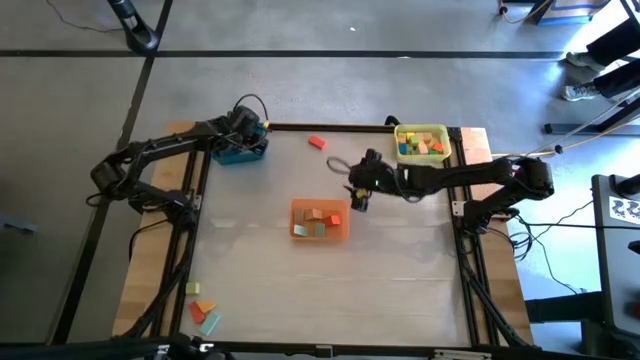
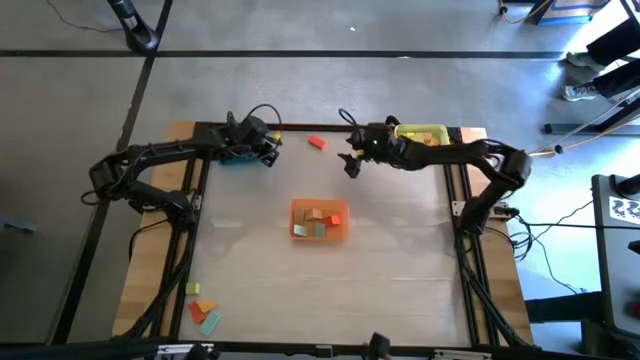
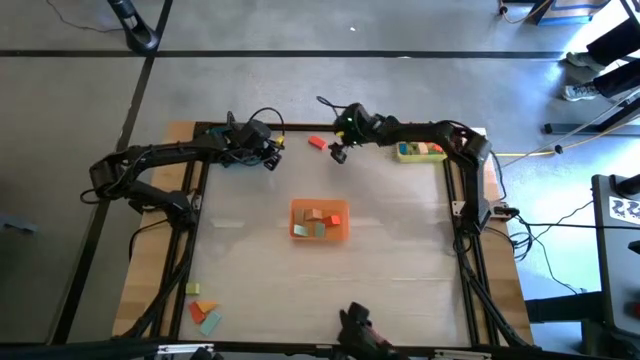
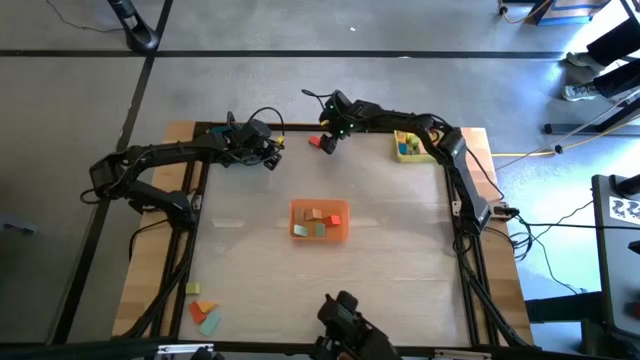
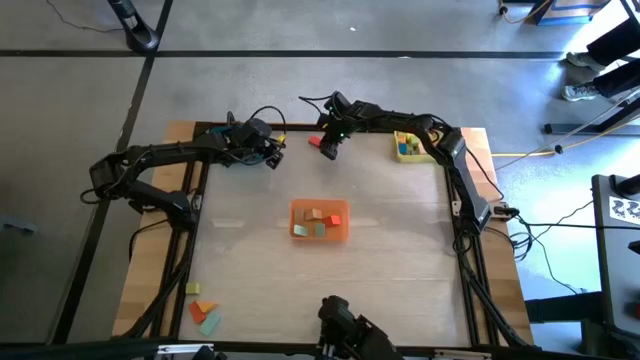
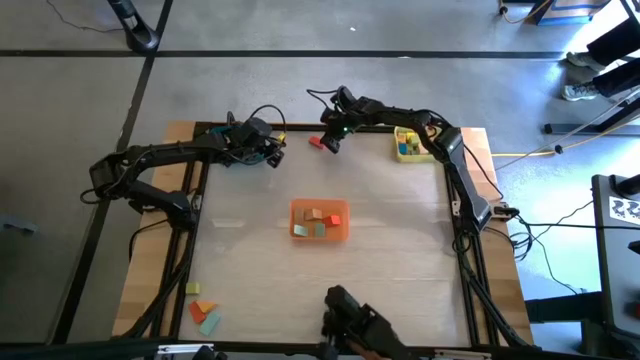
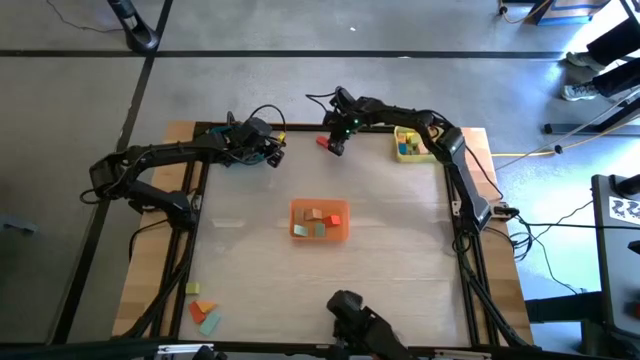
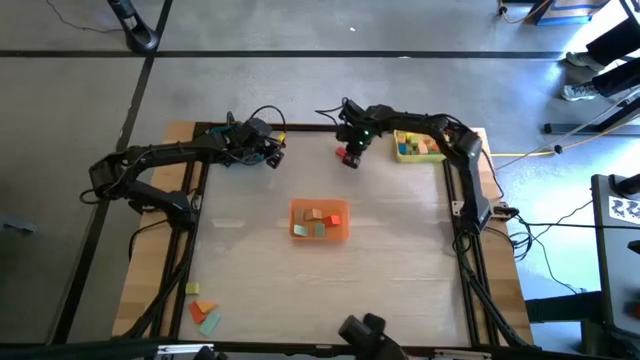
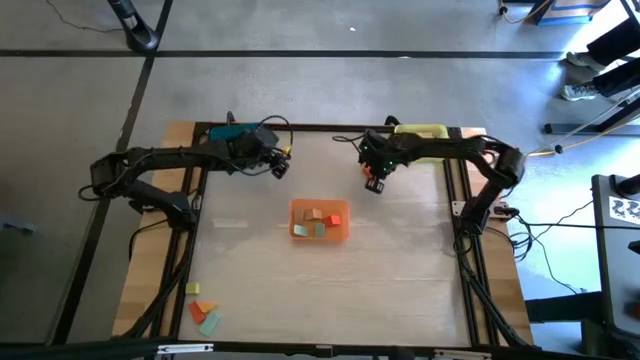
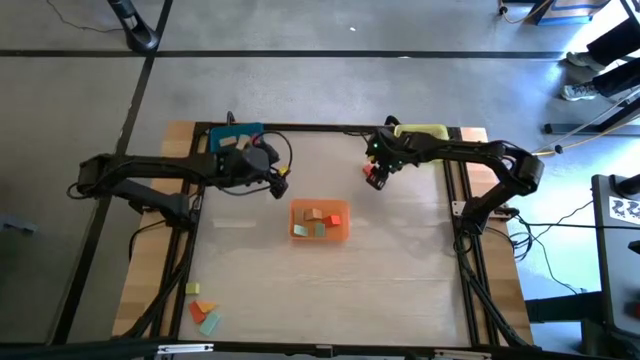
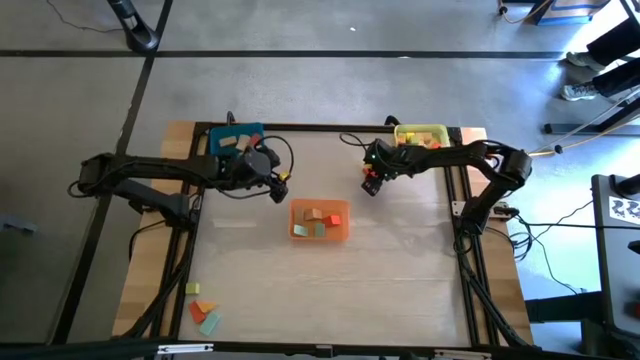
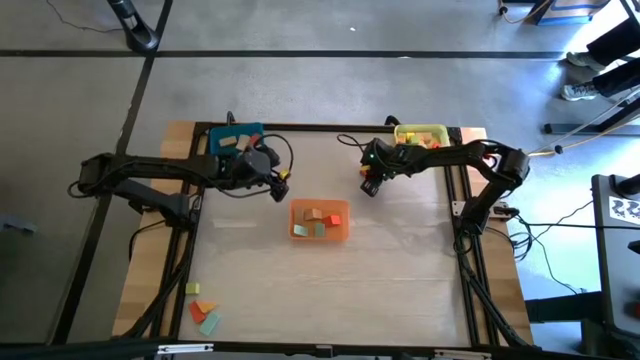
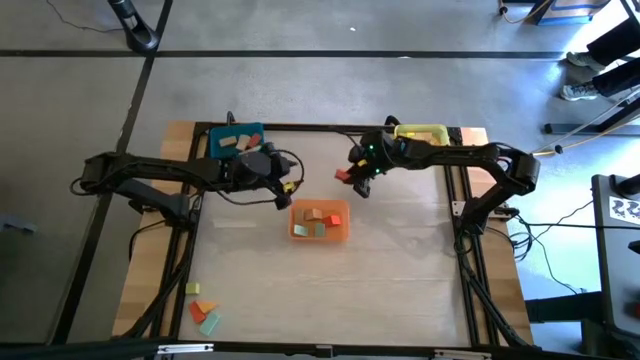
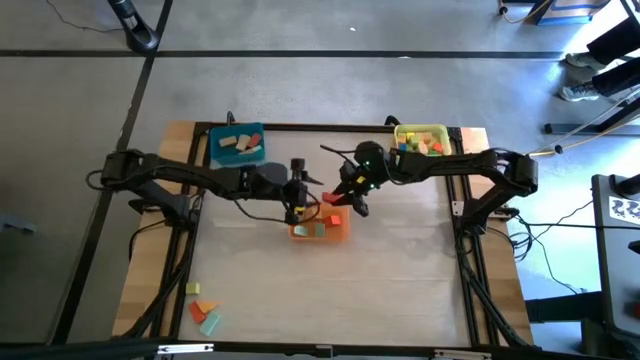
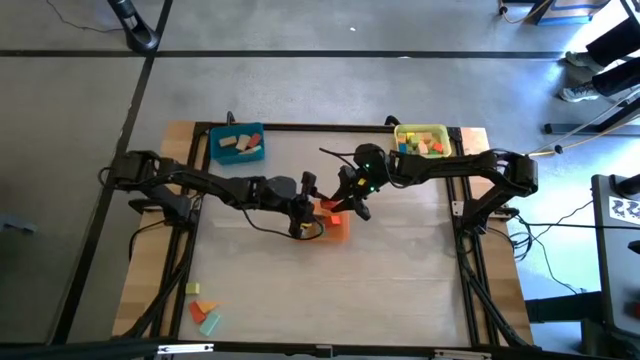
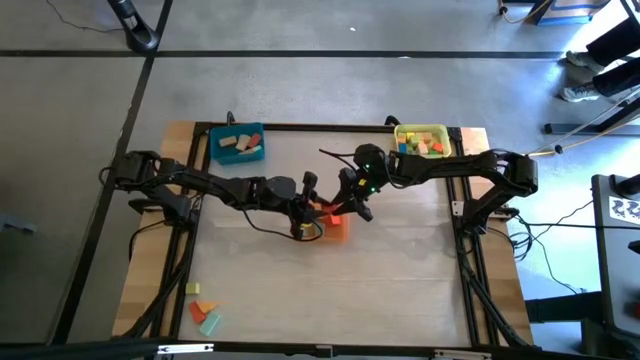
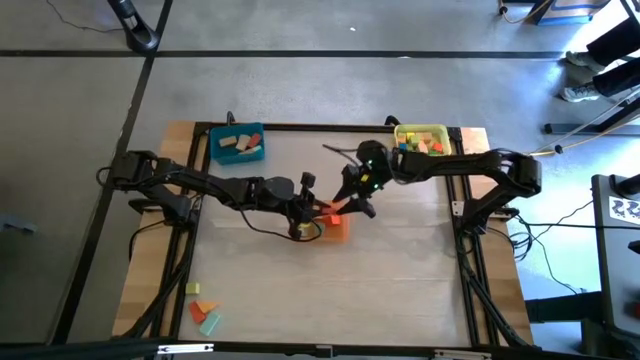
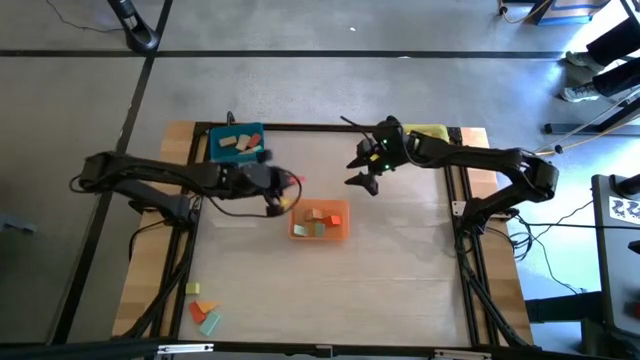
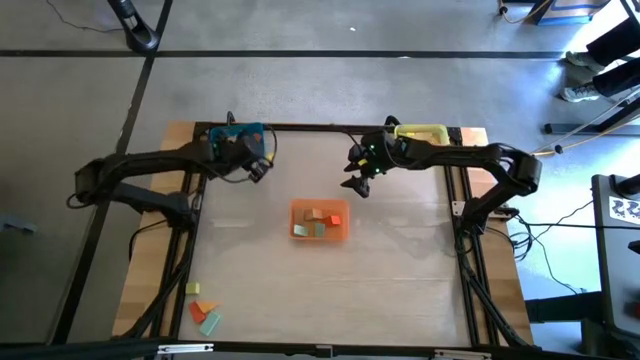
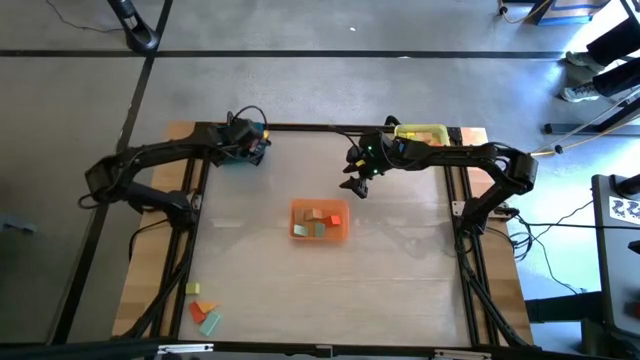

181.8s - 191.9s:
Task: Sort blocks by size
Put the orange rectangular block into the blue bin

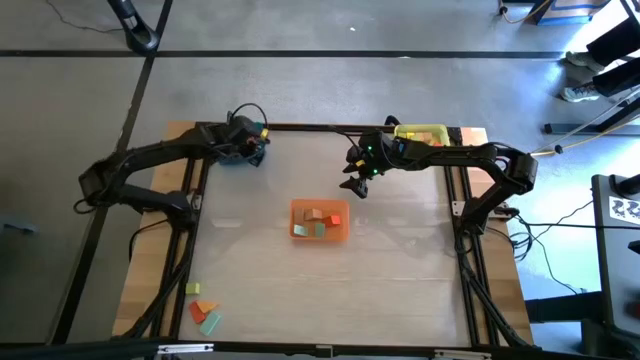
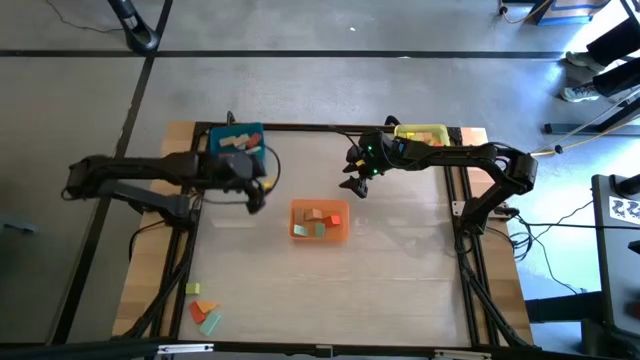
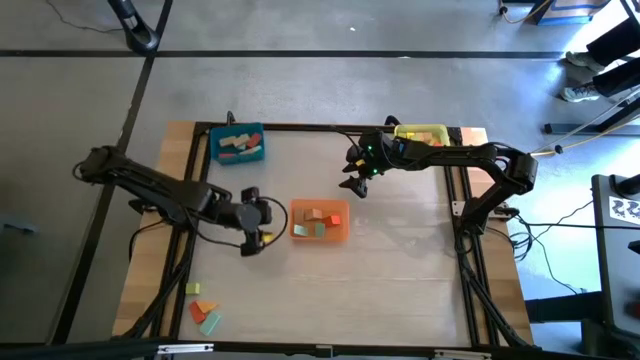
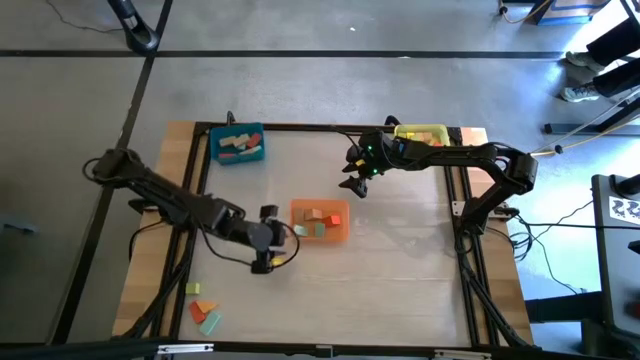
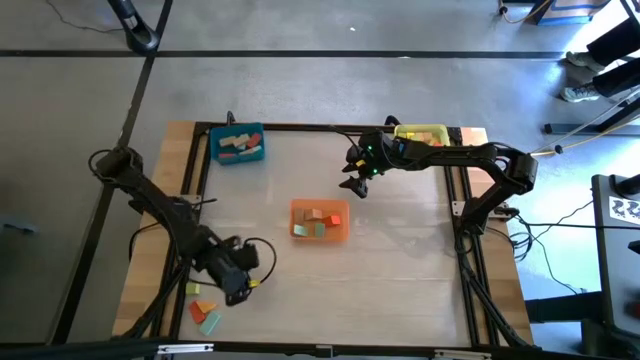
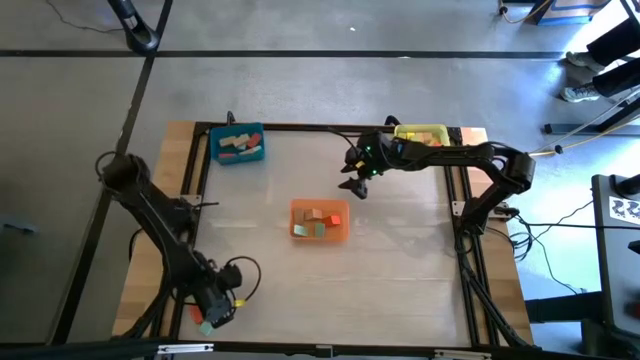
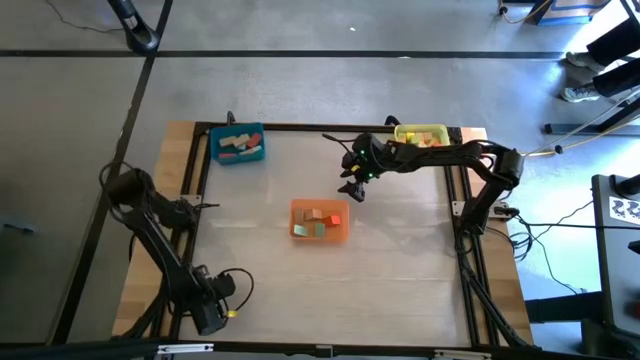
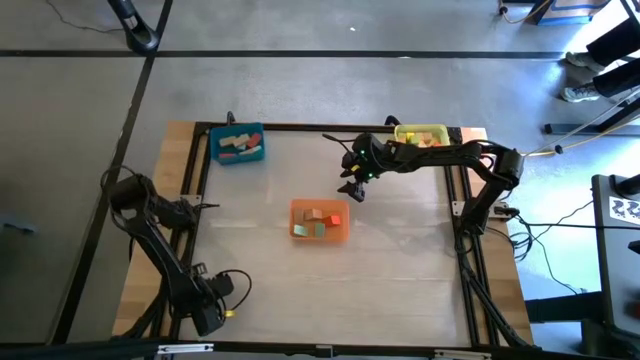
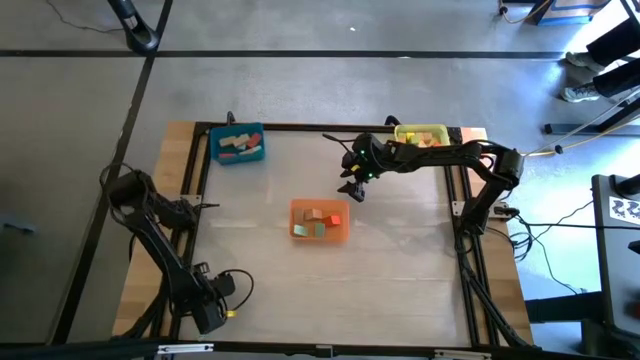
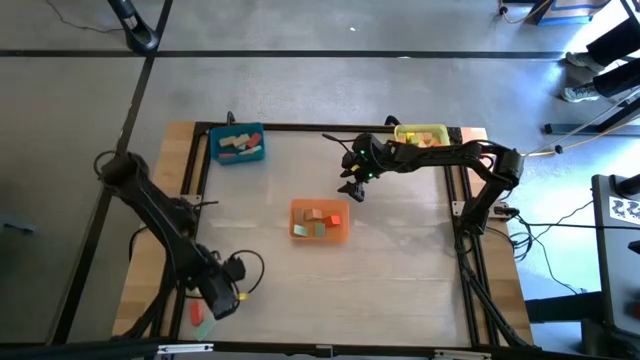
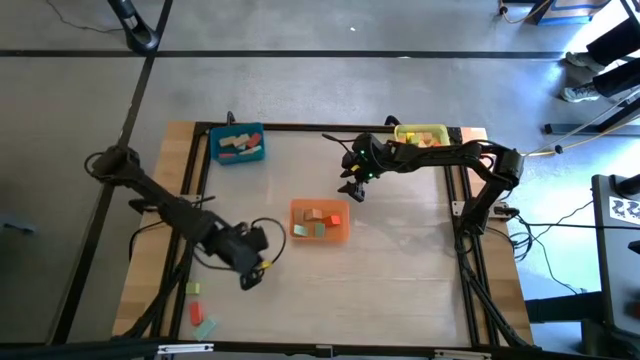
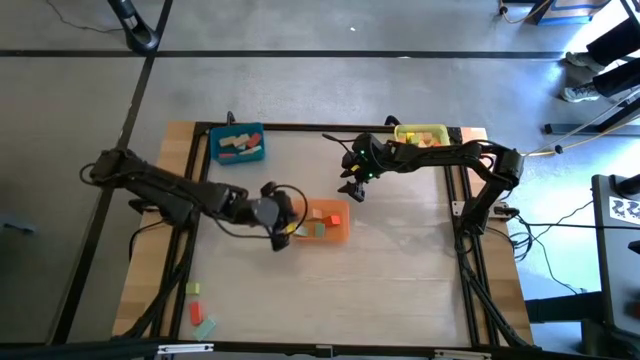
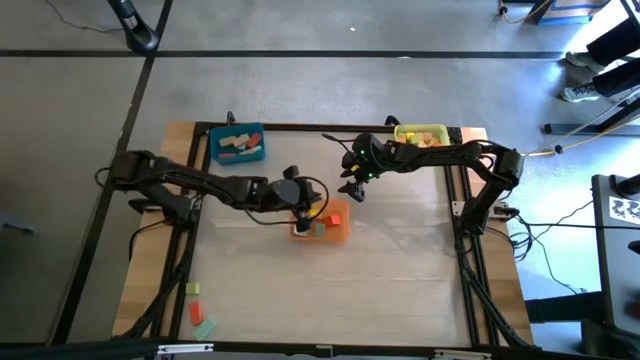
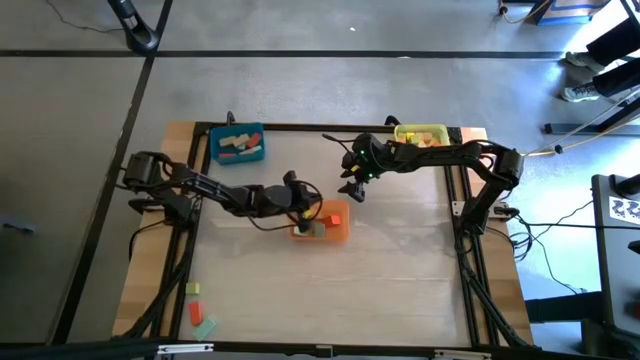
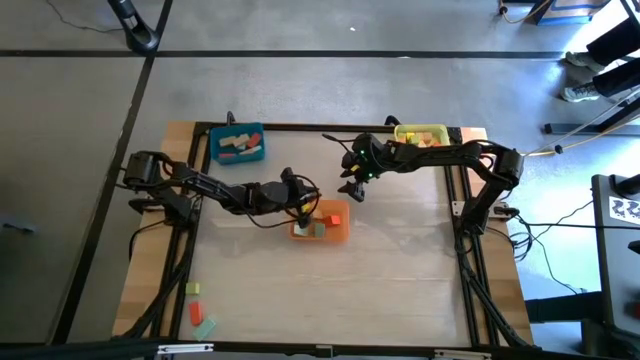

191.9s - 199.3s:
Put the yellow triangular block into the orange bin

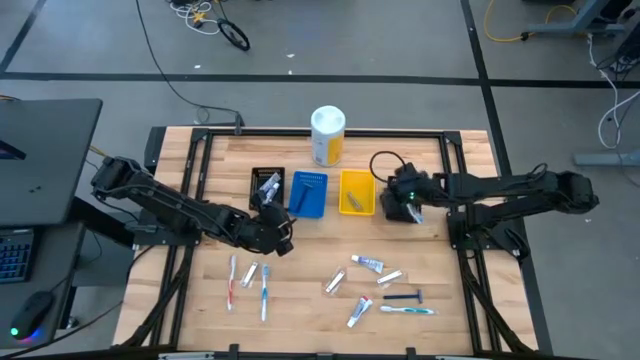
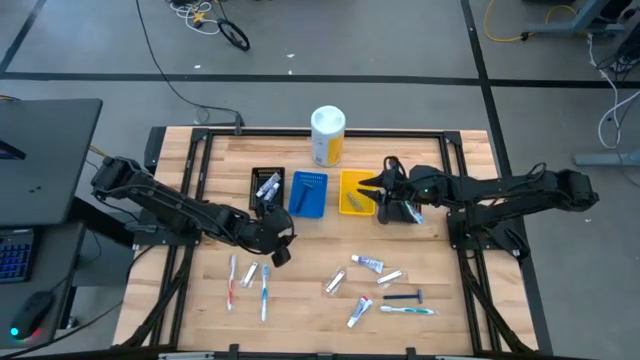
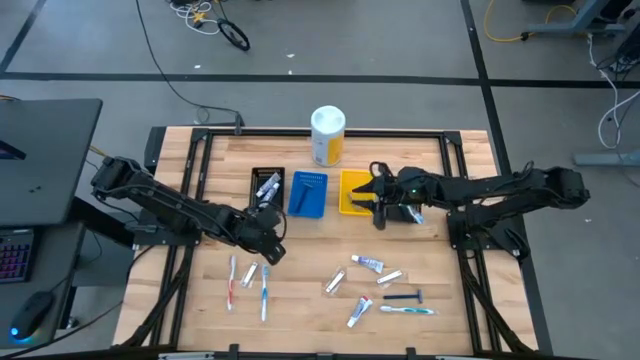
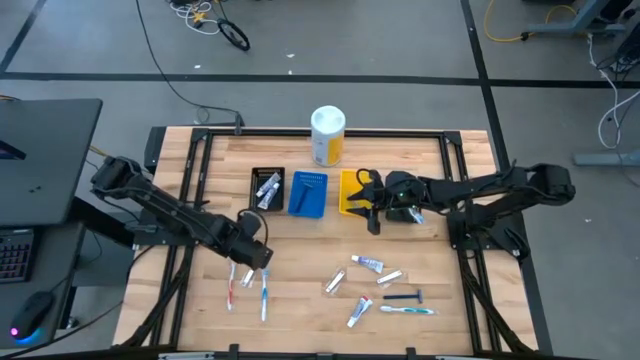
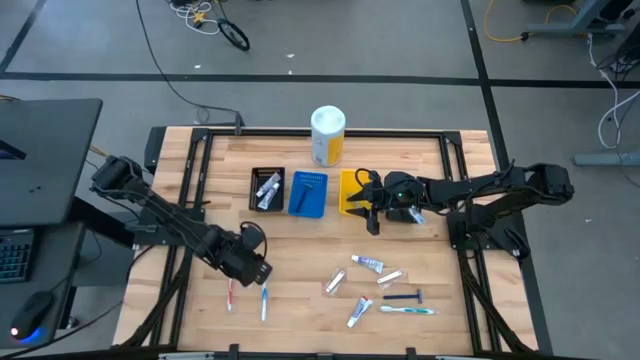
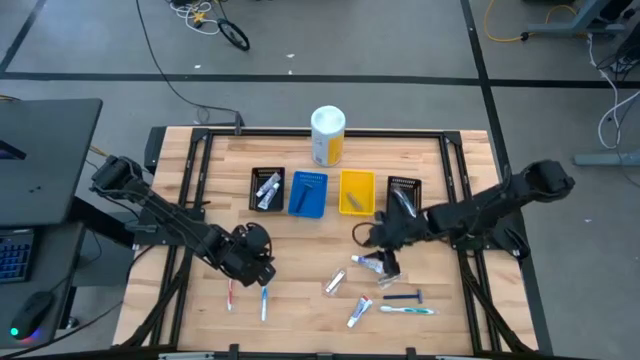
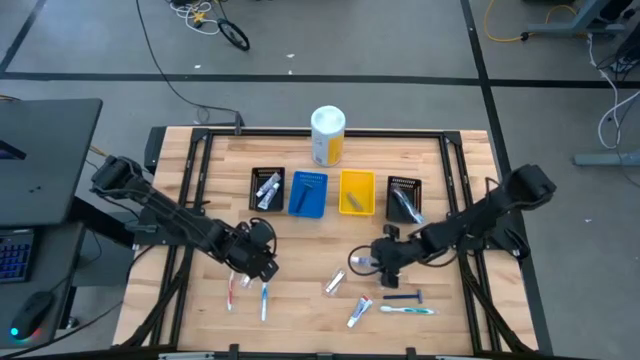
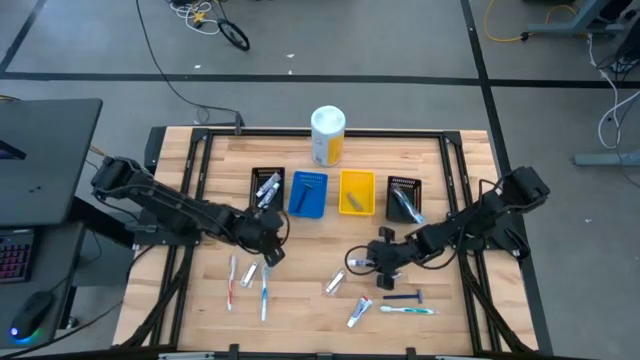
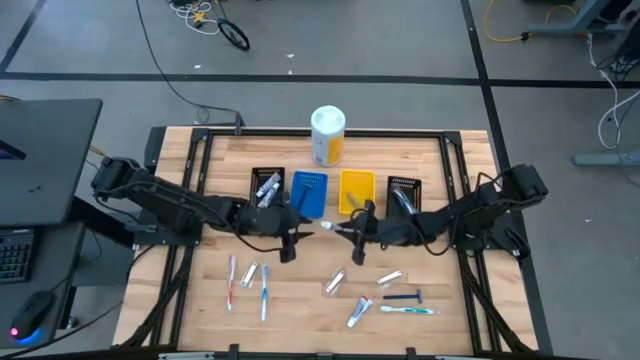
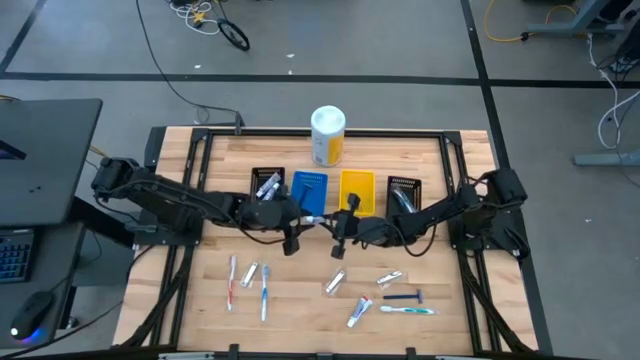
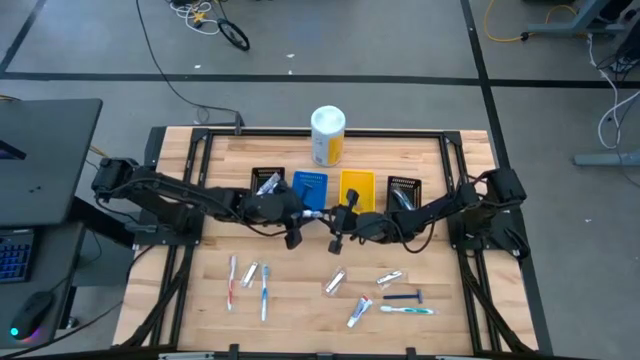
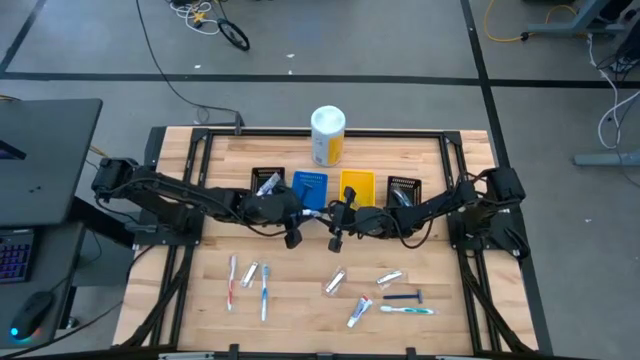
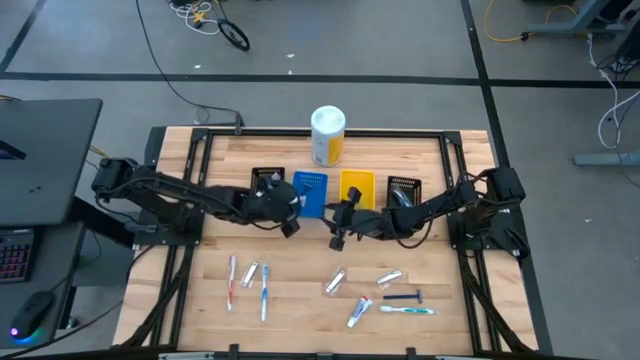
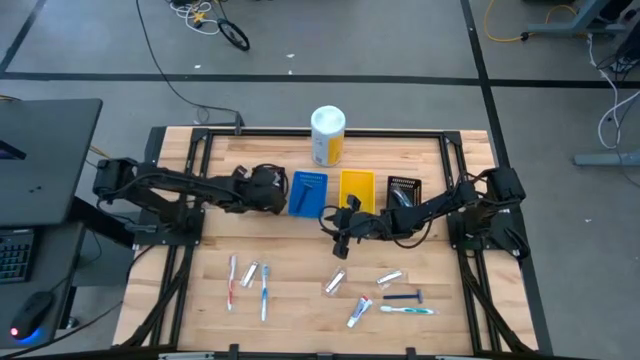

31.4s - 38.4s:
Task: Pick & Place Travel size toiletries
Put the white toothpaste into the left black bin
